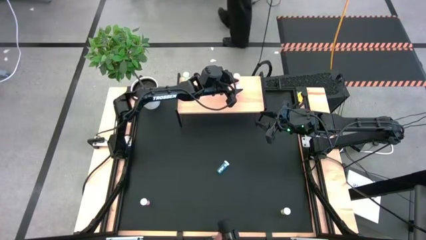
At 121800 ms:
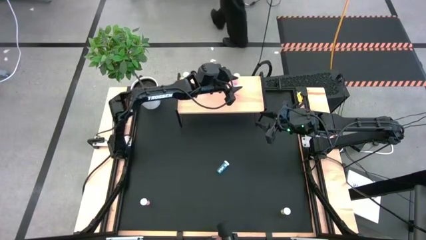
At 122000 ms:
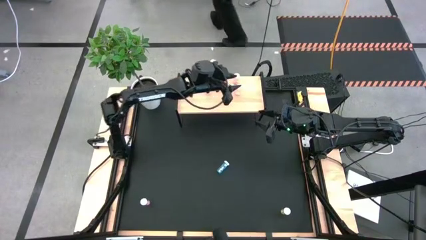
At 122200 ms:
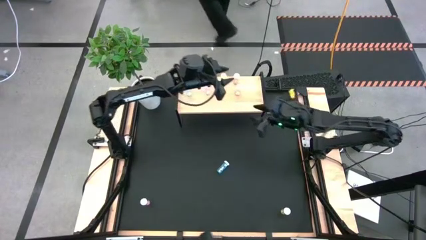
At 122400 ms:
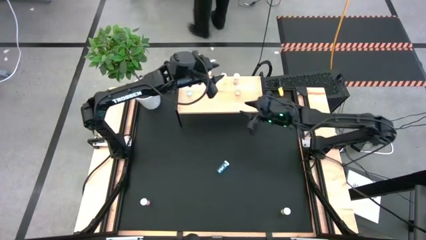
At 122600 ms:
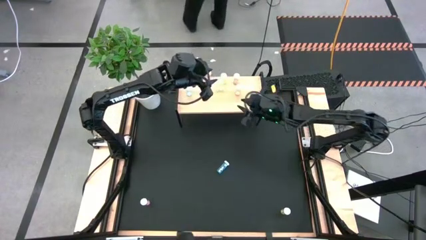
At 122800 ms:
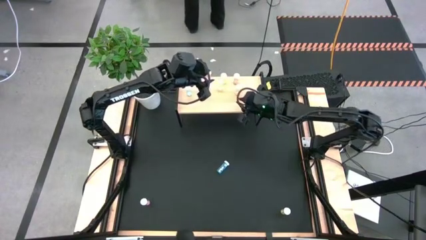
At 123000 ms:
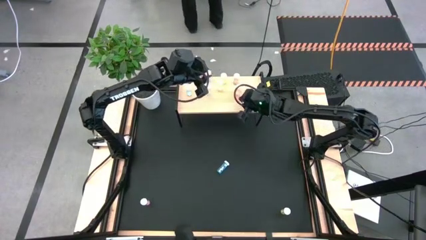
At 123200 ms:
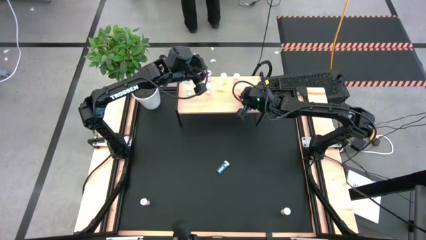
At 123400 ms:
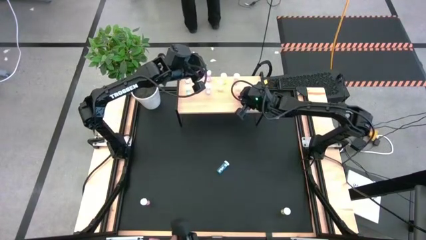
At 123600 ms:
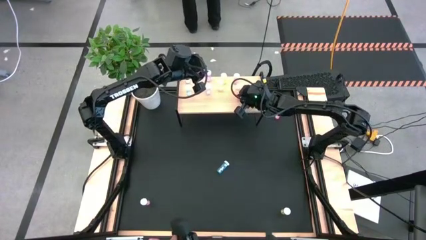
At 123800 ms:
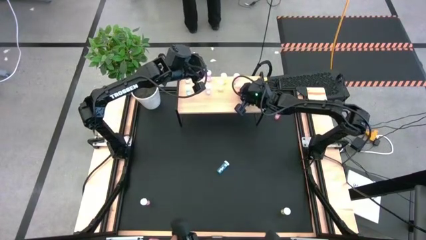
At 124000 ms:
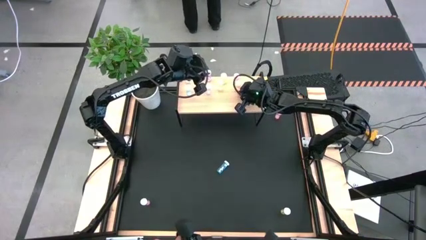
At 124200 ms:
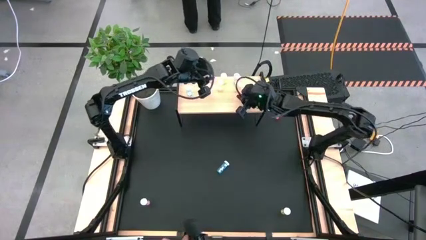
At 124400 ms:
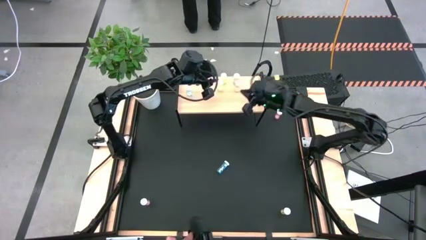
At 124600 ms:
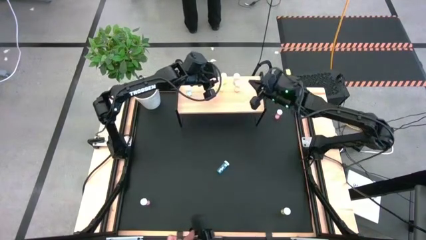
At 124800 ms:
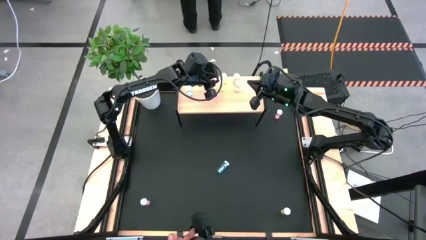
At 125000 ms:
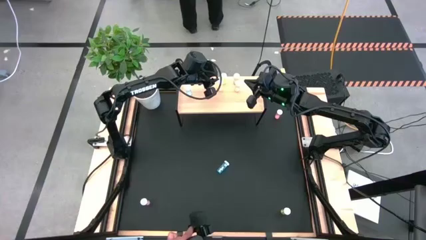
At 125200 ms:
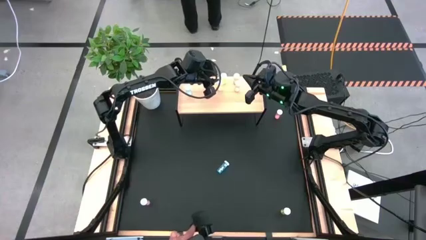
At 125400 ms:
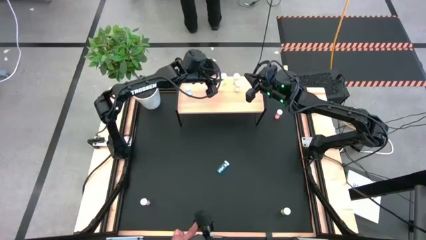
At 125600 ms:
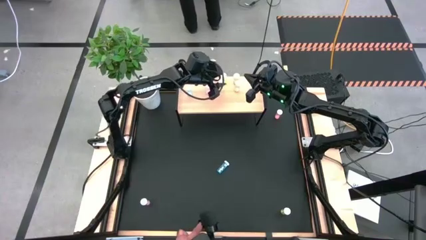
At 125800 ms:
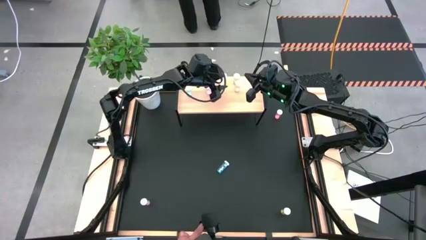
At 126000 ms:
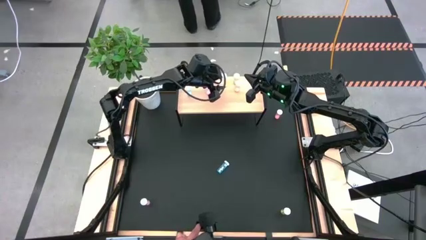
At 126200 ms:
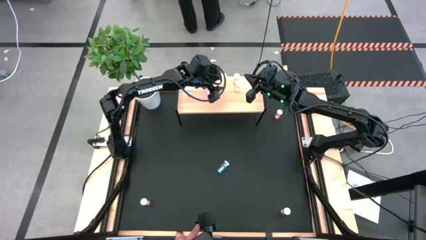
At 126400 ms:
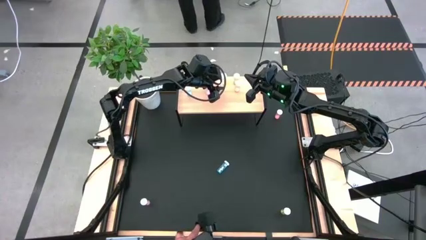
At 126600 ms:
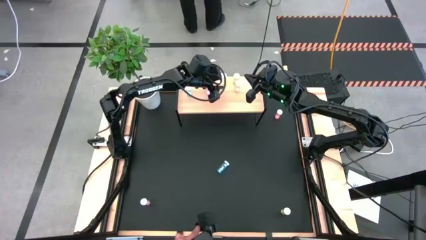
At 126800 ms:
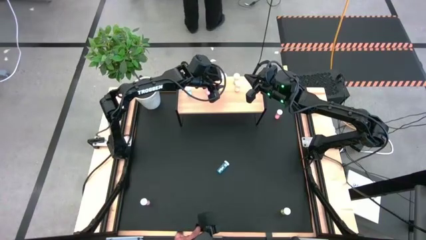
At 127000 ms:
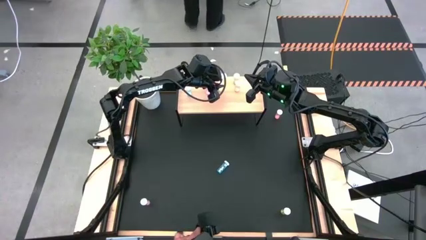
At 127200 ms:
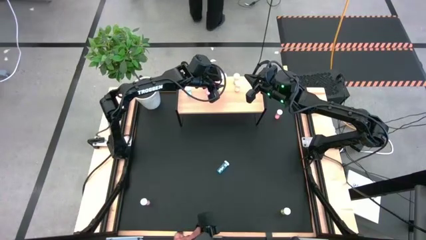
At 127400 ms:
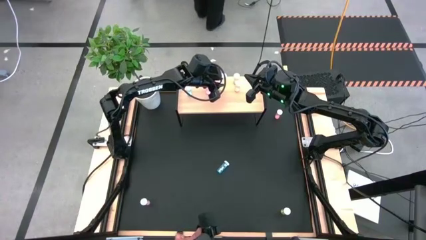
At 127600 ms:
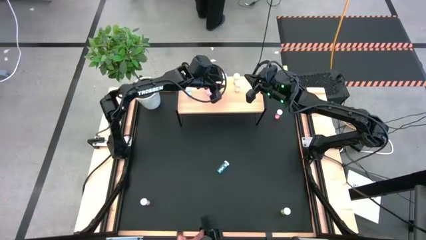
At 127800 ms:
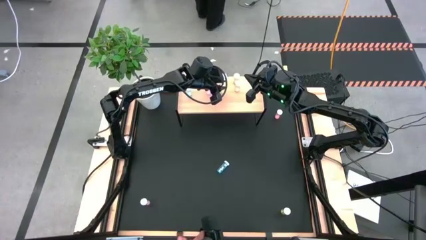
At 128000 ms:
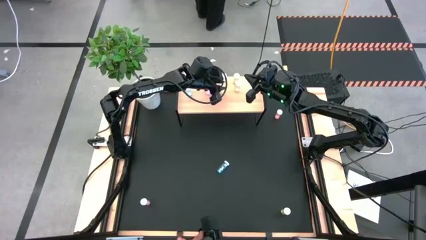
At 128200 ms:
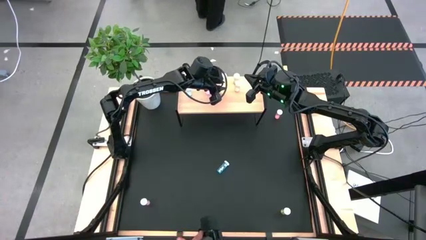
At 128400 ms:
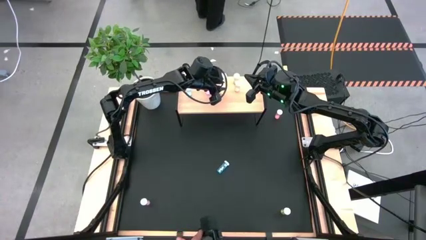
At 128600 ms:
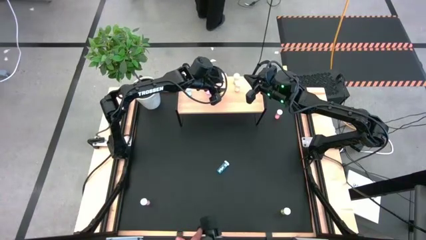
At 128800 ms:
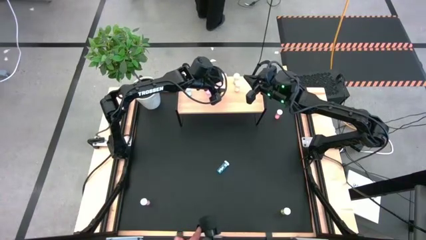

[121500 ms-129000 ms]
Task: Pick and place medicine bottles onto shelf by color
Adjust the pill bottles

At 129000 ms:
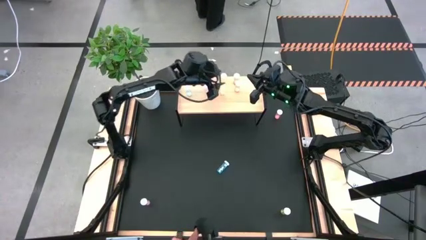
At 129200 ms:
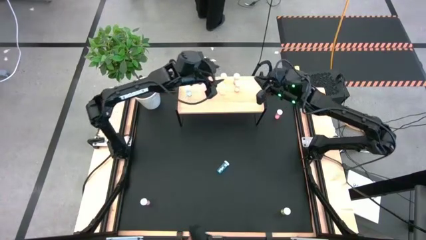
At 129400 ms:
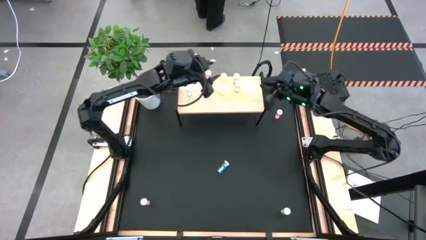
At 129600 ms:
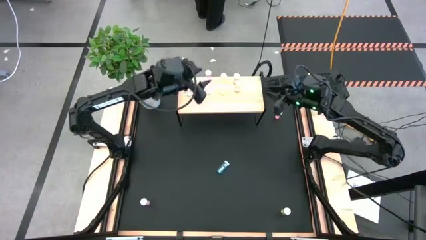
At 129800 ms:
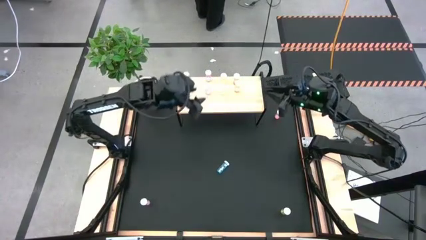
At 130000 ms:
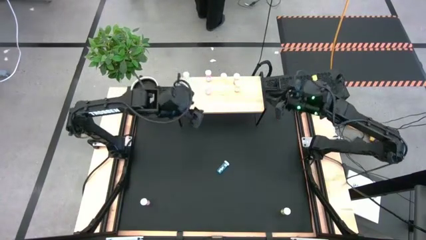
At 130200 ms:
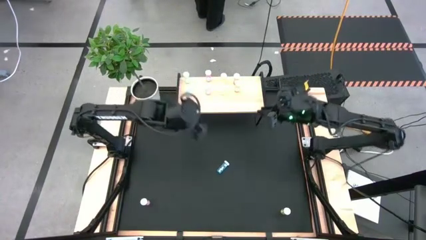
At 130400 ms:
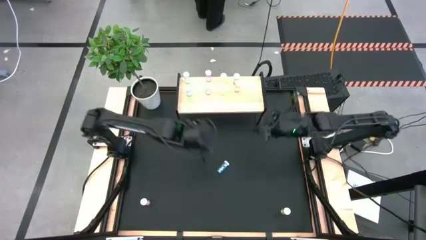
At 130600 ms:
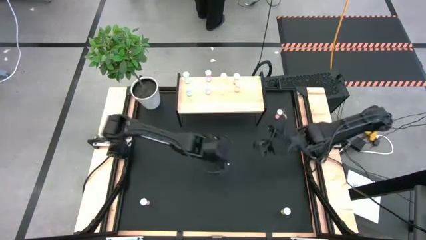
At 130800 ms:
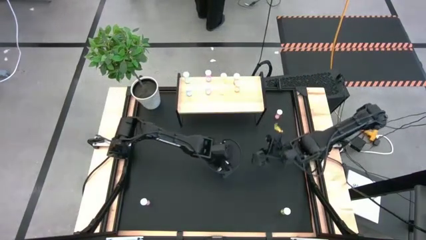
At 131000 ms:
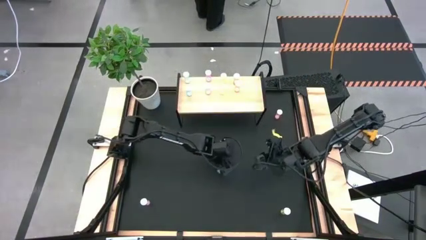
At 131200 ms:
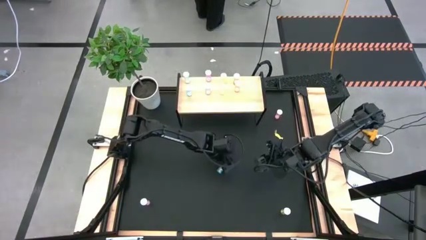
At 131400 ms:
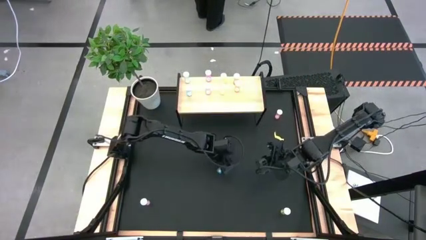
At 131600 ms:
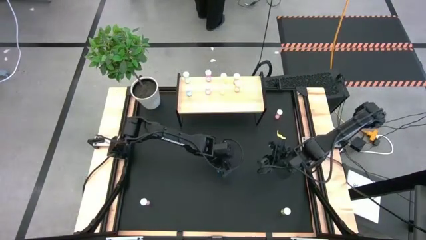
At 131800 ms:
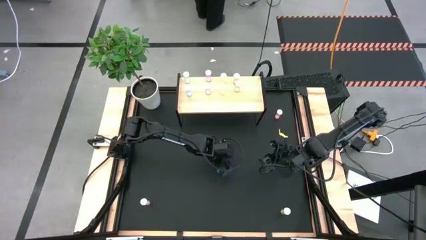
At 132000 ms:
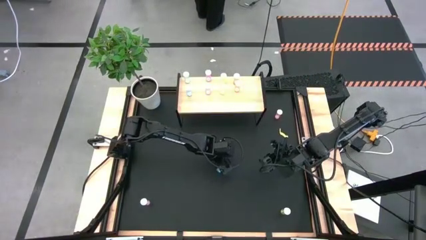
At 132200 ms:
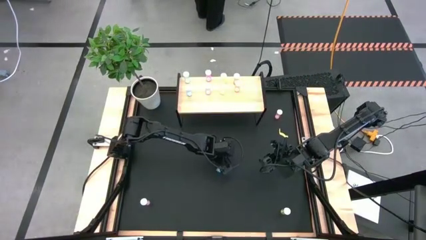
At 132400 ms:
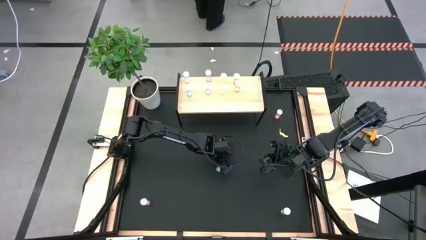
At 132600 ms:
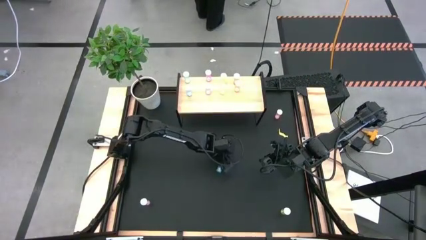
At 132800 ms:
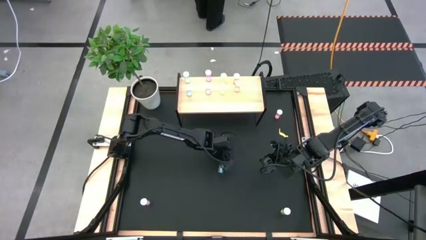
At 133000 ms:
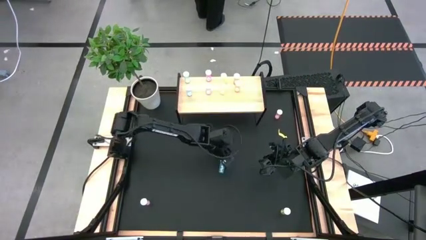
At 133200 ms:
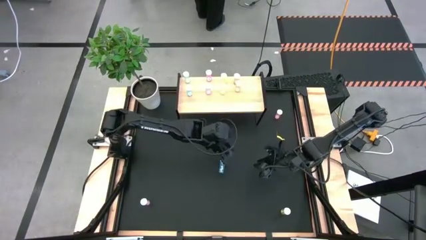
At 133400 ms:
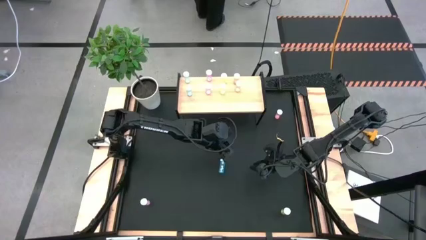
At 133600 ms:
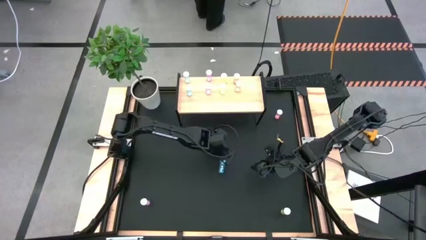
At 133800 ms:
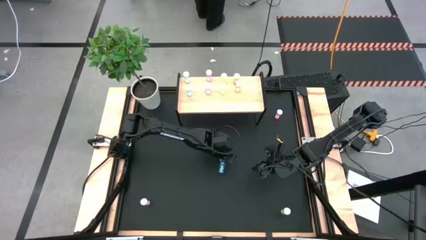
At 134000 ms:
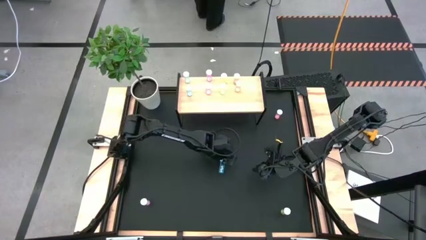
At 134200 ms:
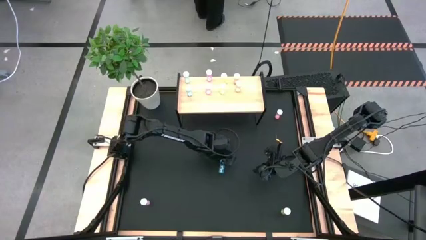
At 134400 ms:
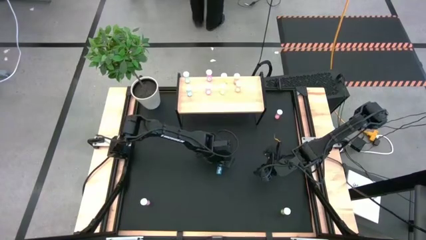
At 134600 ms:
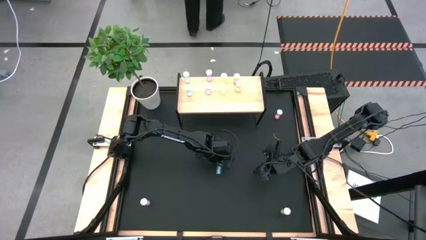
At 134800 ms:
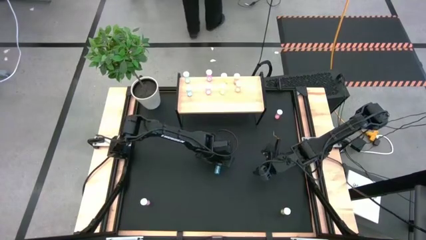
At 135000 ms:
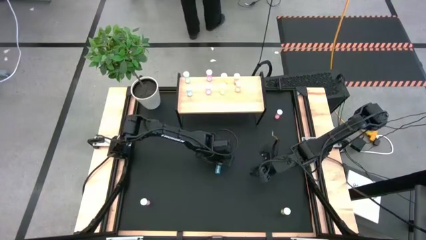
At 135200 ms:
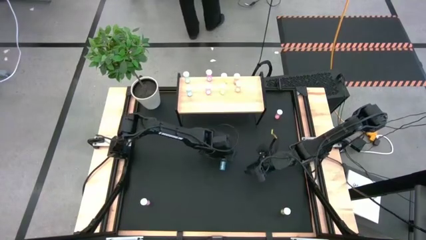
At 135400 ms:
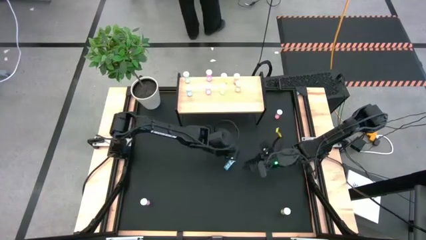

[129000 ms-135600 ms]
Put the blue pill bottle on the shelf aligned with the other blue pill bottles
